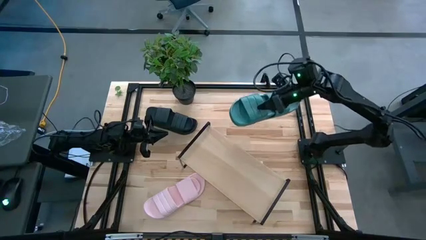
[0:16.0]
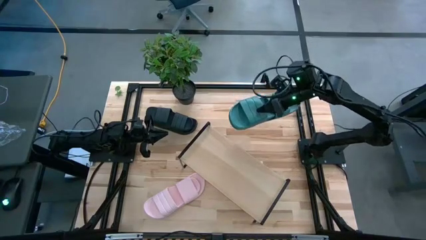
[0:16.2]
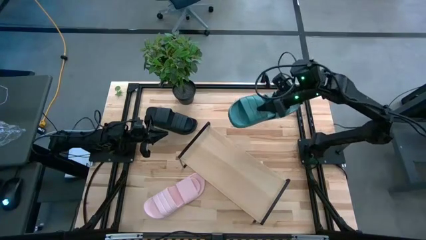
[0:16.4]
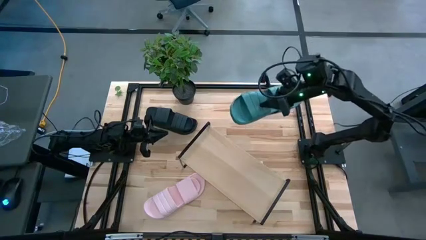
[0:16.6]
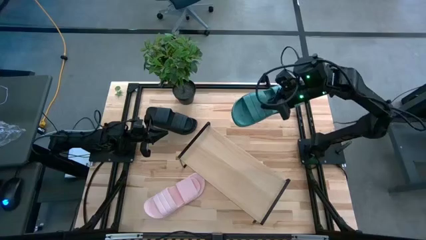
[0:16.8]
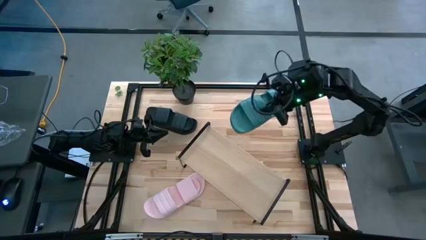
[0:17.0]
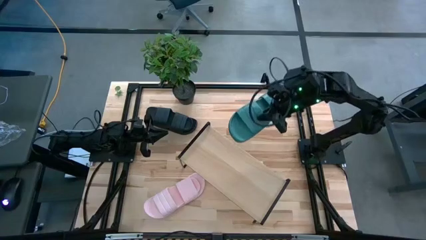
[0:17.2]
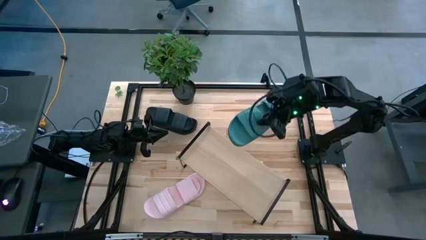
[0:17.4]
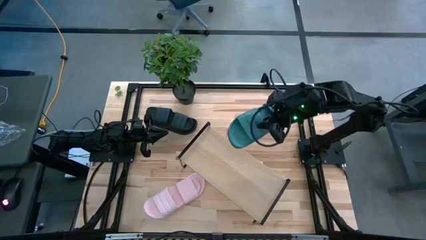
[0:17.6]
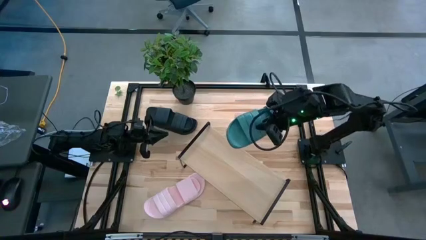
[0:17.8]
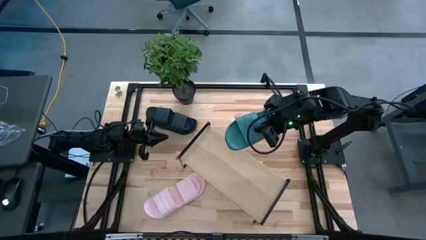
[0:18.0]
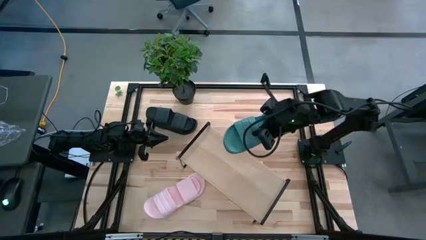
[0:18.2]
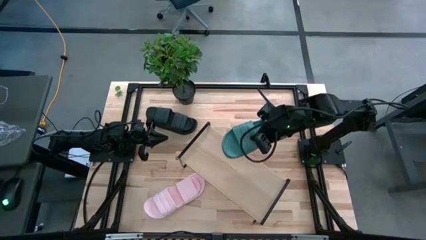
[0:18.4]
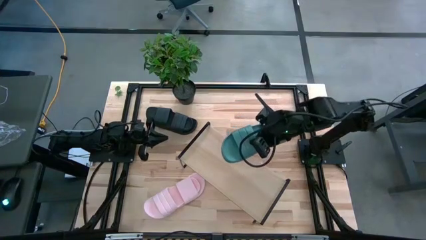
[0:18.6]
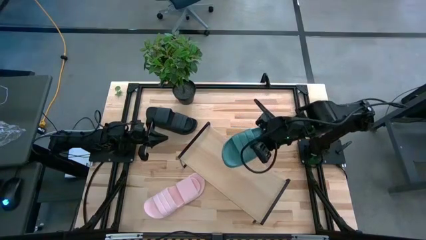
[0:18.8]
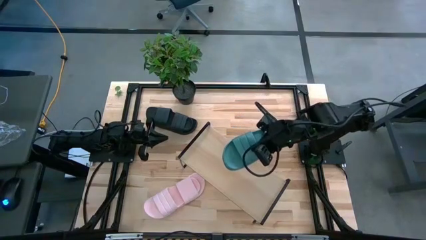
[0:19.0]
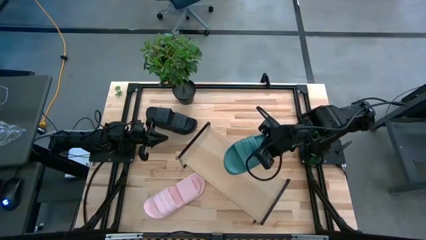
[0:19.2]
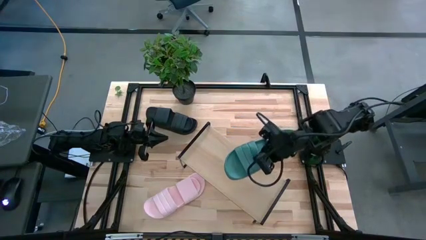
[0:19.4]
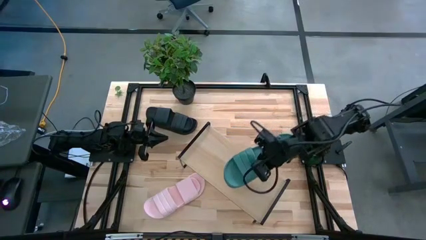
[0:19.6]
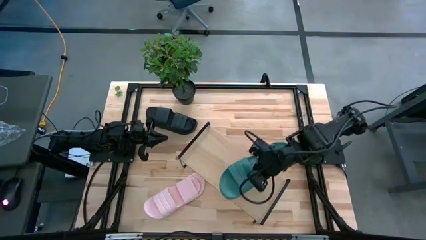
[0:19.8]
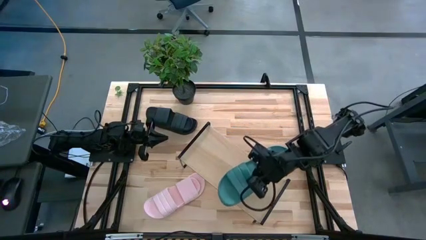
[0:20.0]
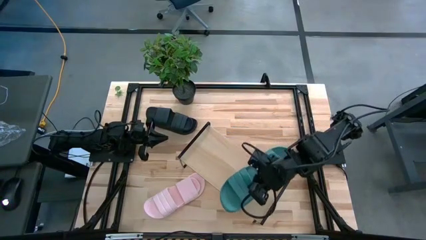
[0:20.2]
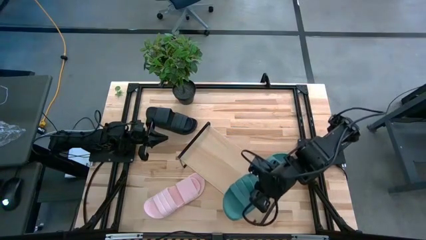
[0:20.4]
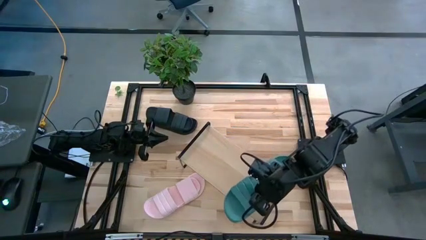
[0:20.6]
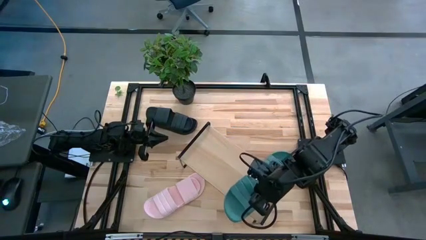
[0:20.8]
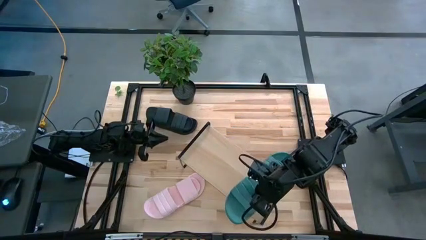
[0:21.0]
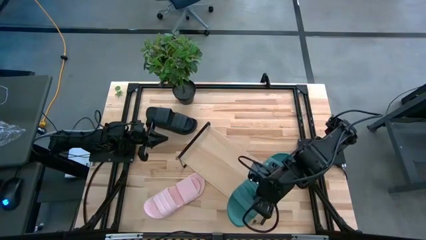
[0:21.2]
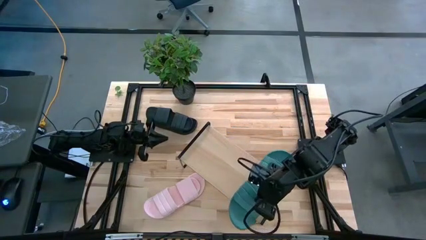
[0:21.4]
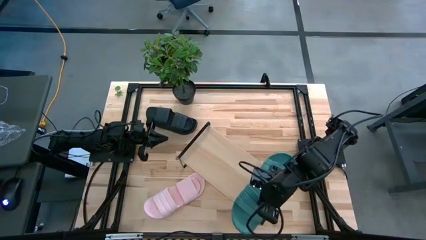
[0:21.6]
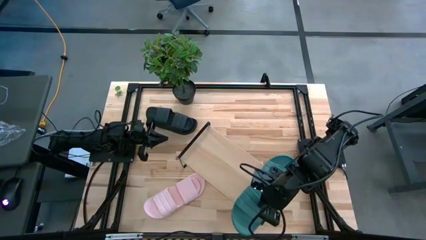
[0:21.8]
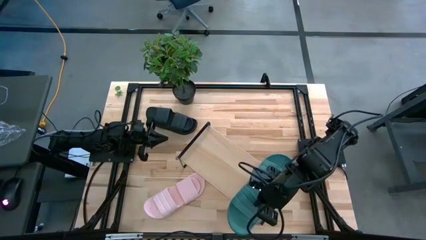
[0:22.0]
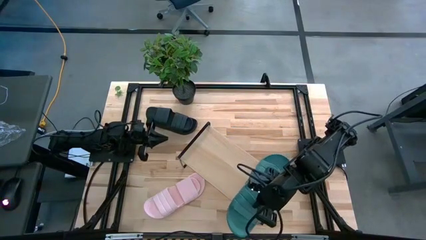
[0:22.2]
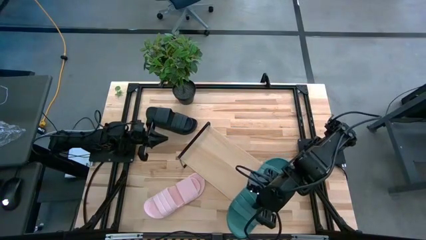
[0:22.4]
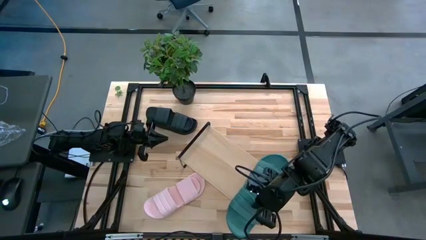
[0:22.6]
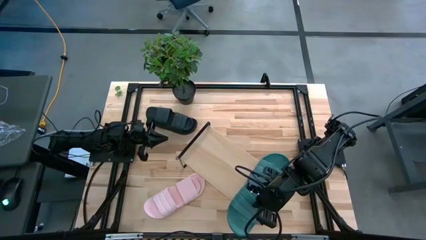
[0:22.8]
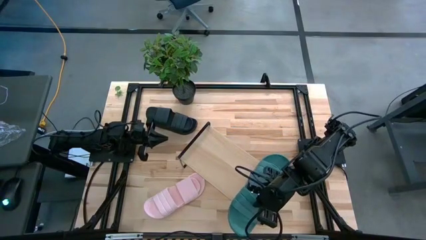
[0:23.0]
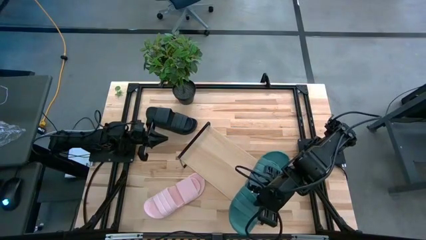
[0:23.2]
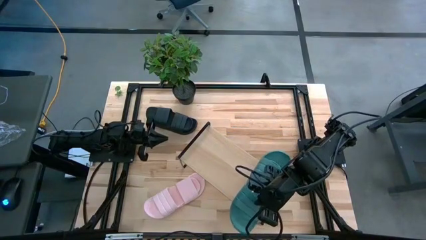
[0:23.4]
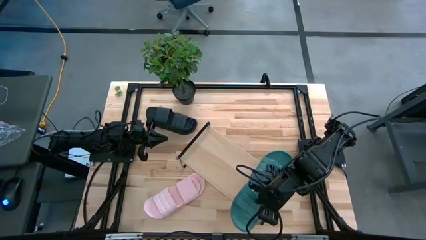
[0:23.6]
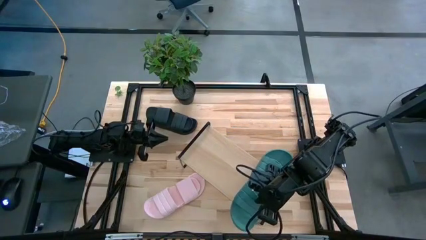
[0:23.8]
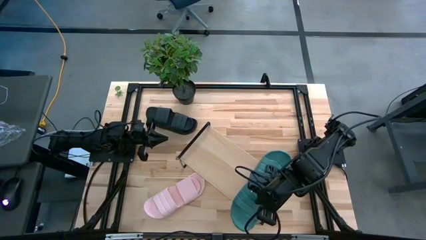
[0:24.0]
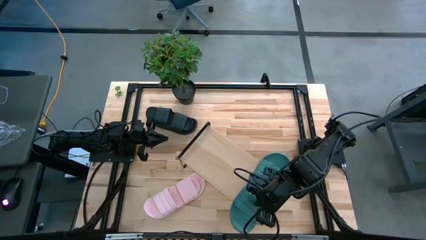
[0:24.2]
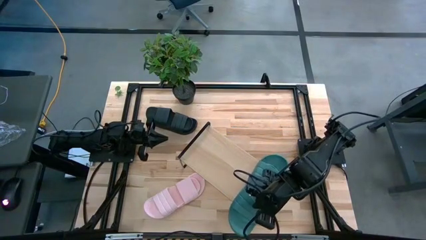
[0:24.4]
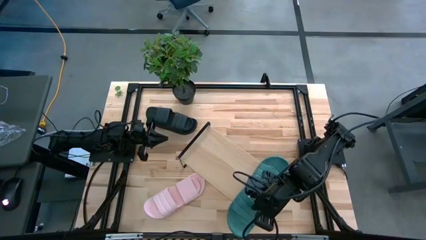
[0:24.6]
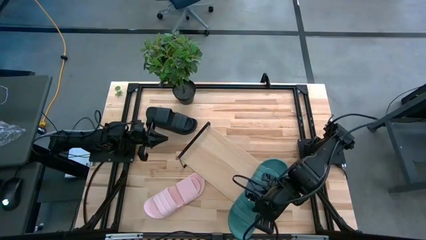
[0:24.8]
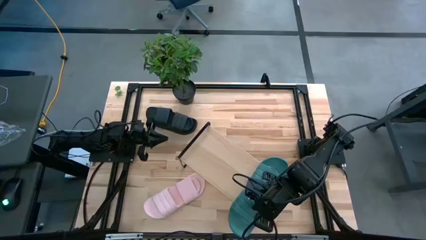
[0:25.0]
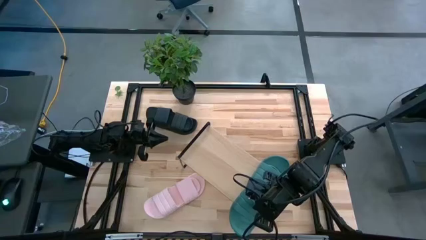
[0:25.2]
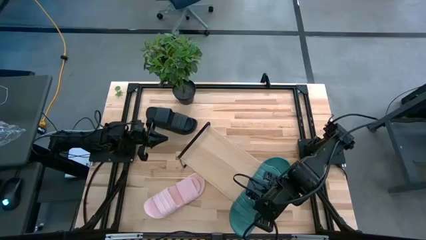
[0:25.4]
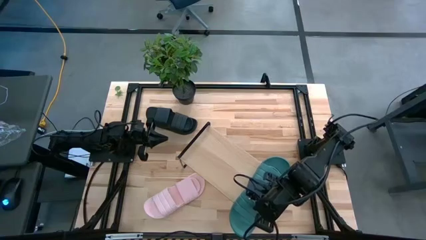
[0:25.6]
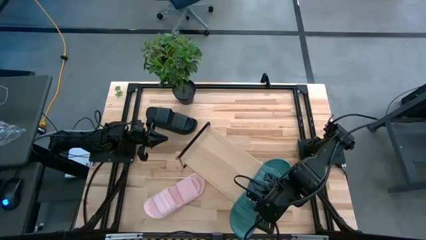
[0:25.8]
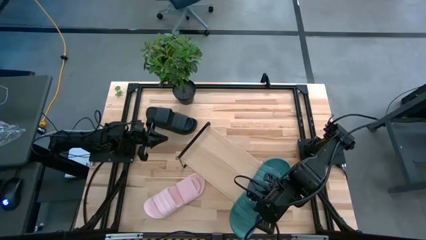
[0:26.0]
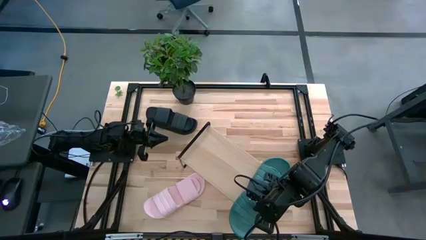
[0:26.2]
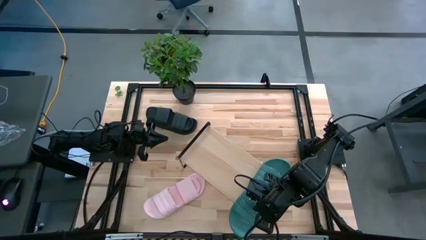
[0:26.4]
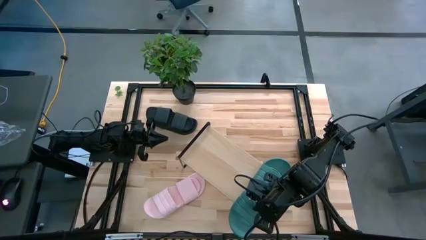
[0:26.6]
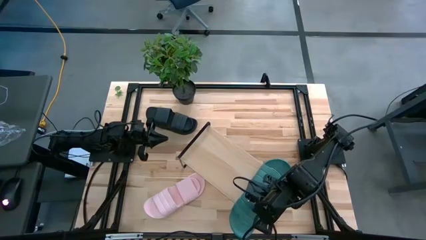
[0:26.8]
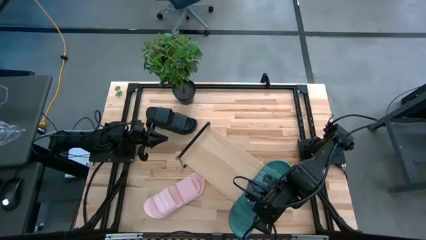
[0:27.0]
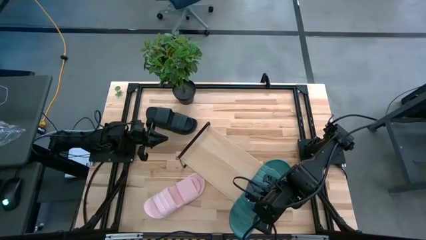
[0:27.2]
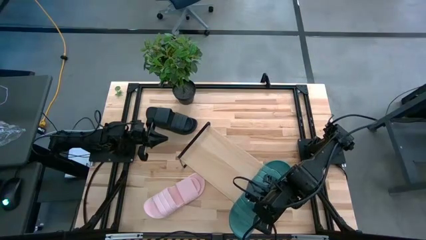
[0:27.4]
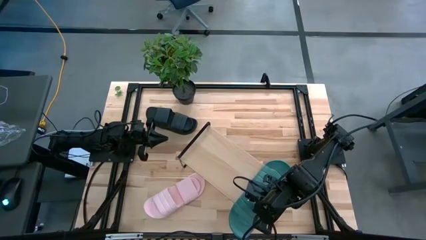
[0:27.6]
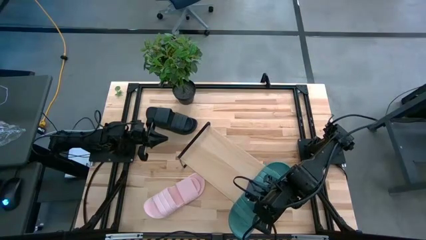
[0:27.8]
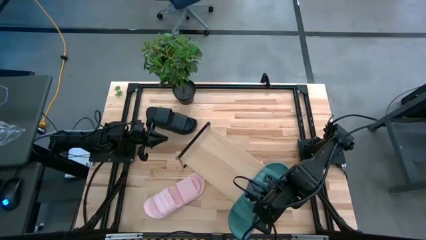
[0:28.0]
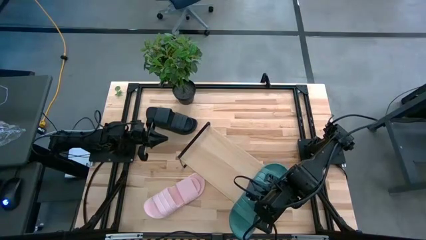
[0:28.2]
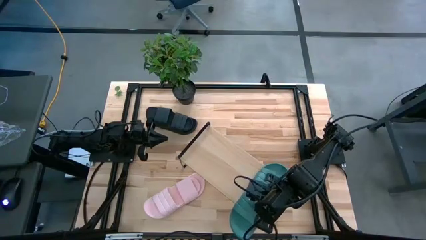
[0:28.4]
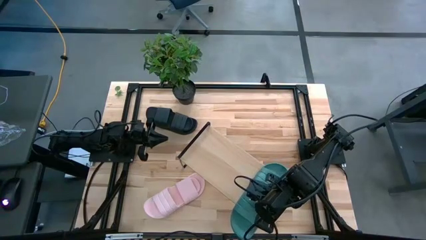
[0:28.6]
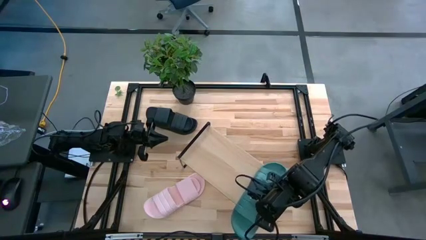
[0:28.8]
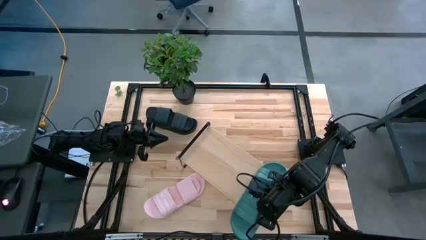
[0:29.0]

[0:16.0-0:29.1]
Task: Pick and place slides into the shelf
Put the green pair of slides on the shelf

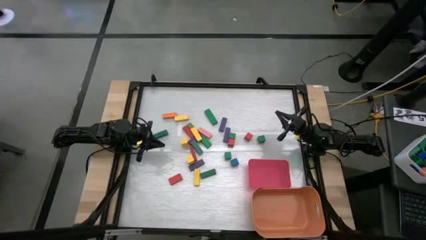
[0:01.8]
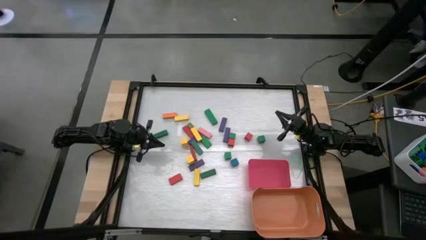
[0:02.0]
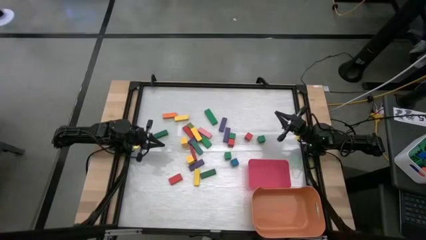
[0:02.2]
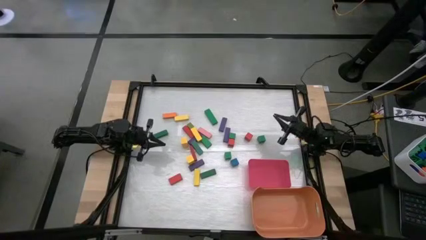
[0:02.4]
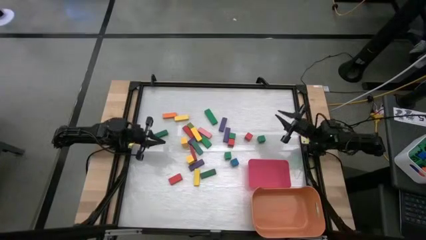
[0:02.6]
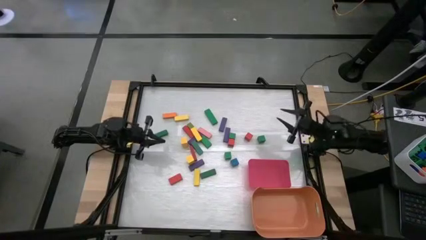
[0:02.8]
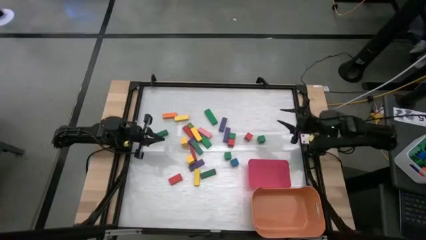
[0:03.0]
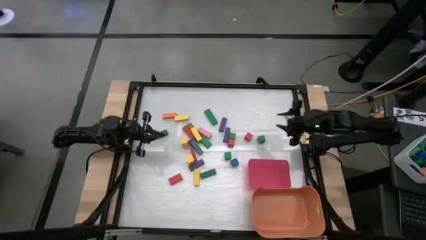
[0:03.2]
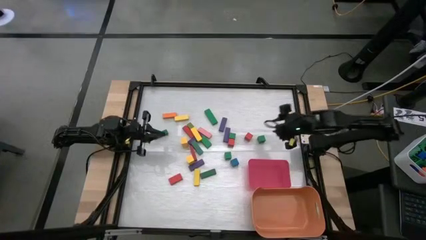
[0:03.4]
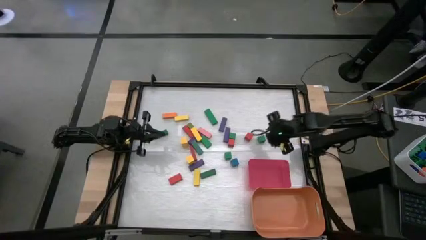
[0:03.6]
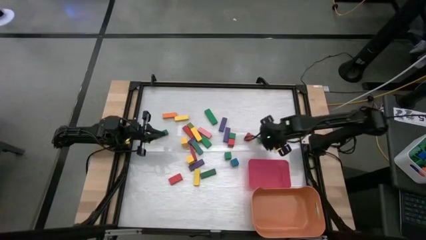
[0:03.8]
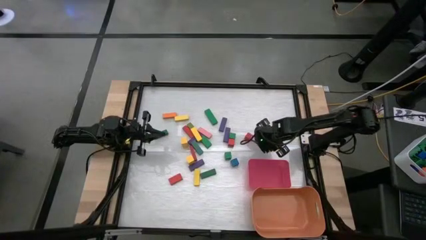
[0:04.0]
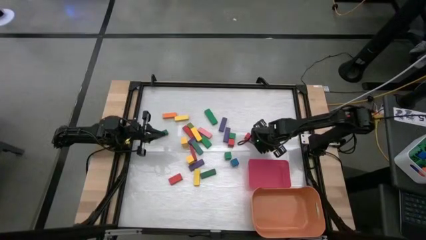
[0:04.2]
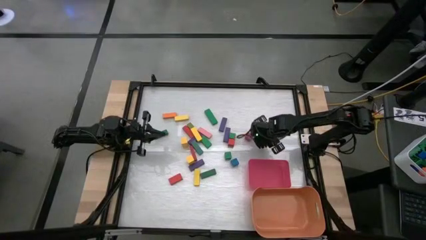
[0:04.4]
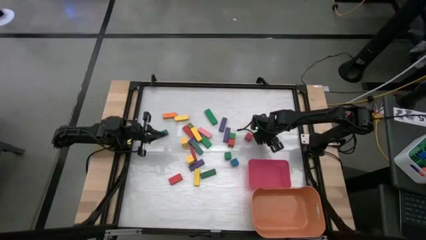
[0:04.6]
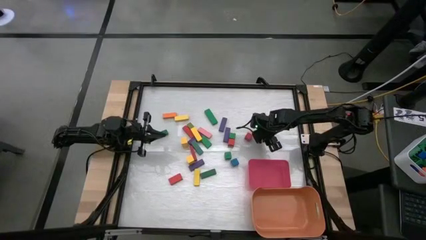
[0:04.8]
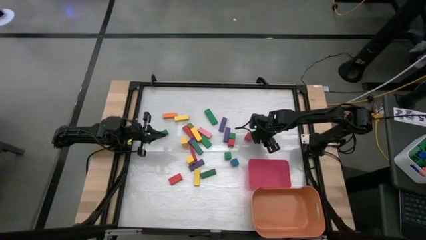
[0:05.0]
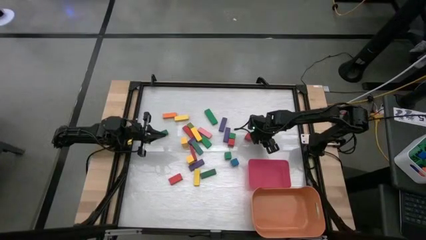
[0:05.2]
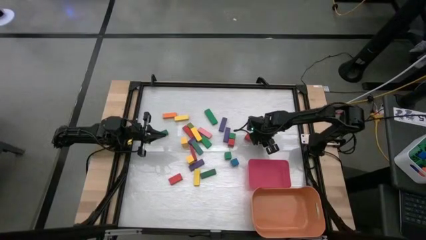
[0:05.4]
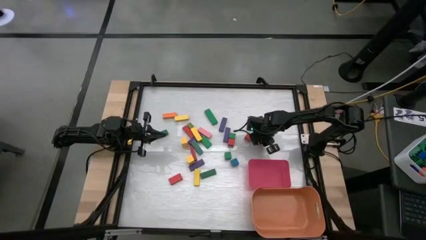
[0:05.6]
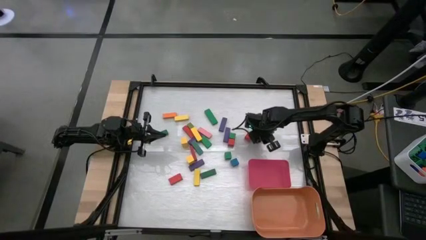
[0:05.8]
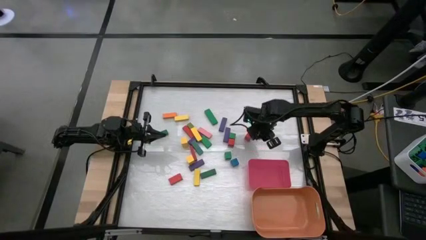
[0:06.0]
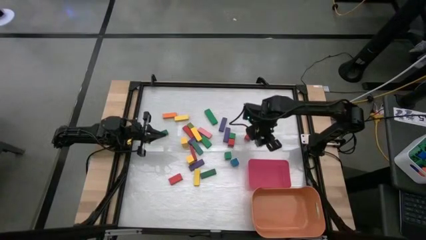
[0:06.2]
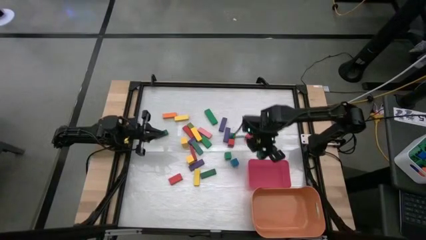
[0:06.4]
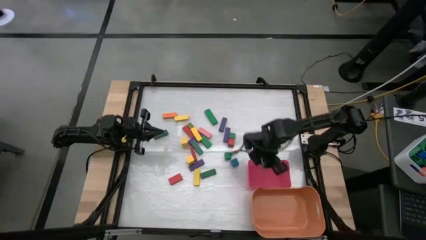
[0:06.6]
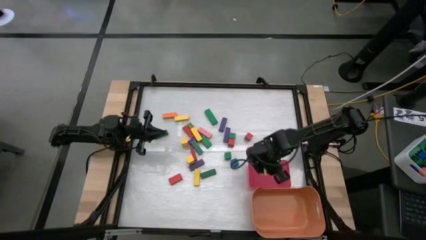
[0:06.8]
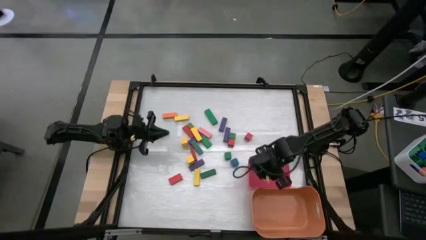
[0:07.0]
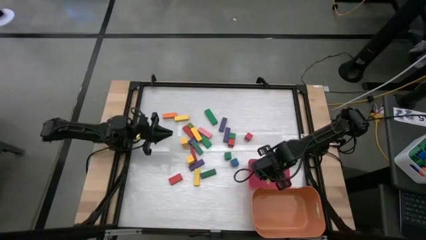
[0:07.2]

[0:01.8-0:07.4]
Task: Sort blocks by size
Put the green square block into the pink bin
